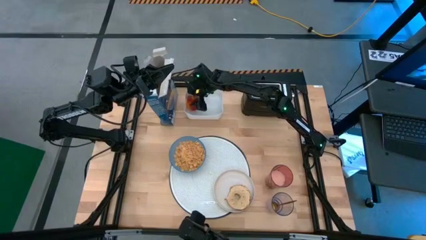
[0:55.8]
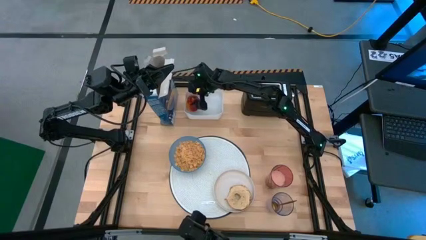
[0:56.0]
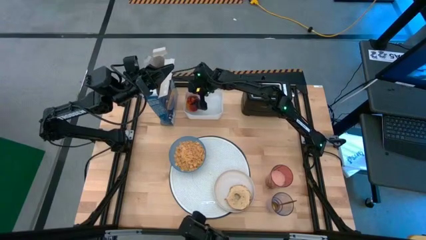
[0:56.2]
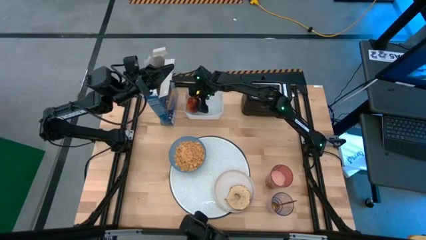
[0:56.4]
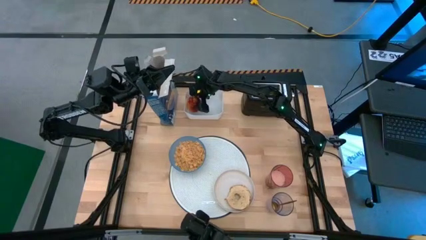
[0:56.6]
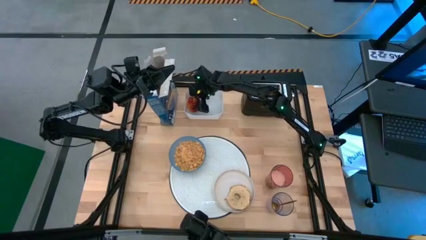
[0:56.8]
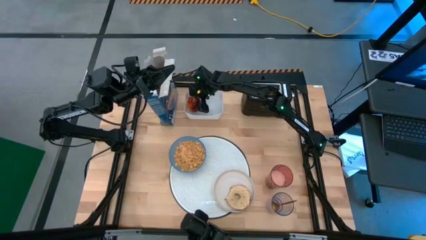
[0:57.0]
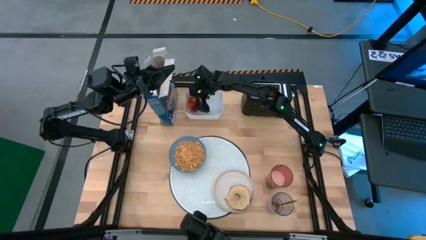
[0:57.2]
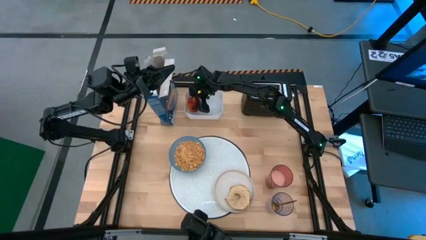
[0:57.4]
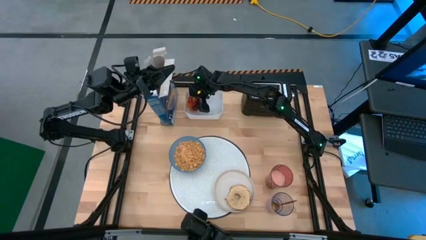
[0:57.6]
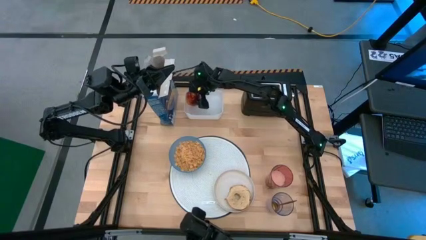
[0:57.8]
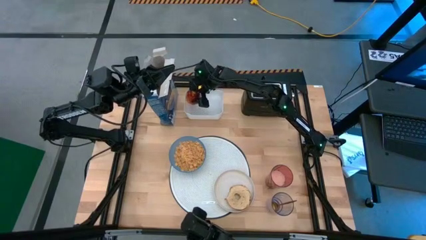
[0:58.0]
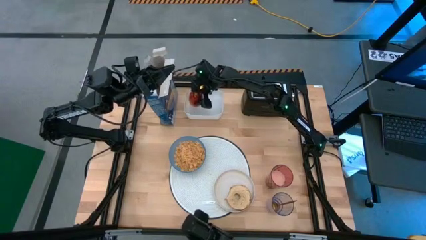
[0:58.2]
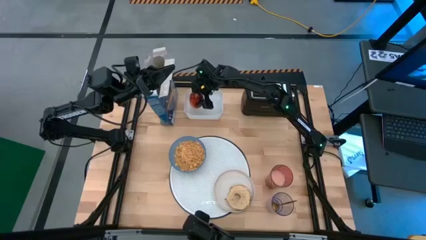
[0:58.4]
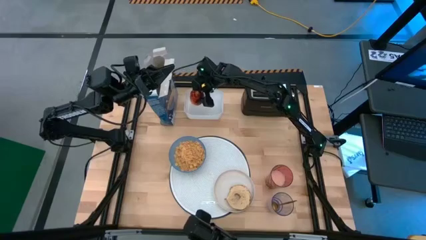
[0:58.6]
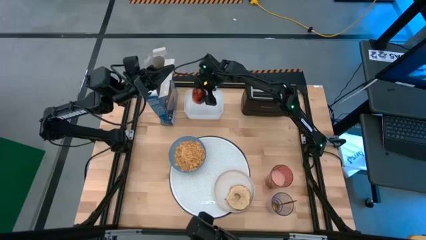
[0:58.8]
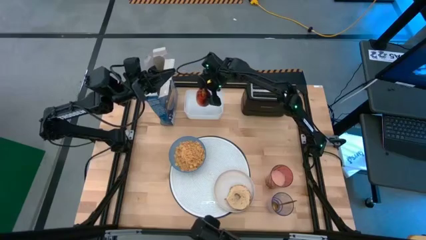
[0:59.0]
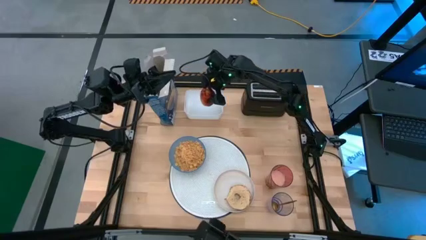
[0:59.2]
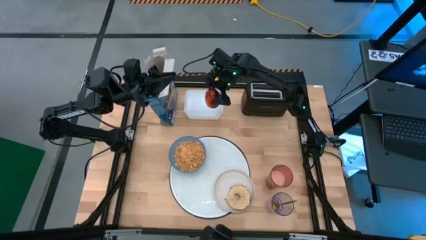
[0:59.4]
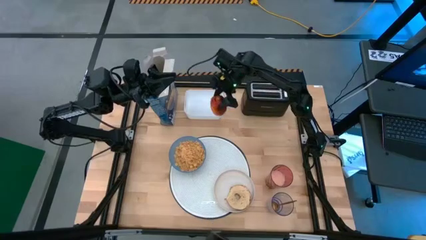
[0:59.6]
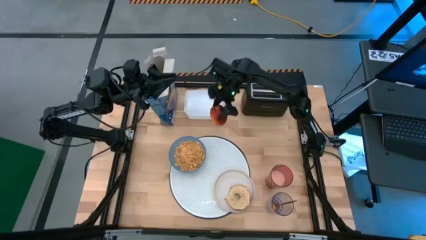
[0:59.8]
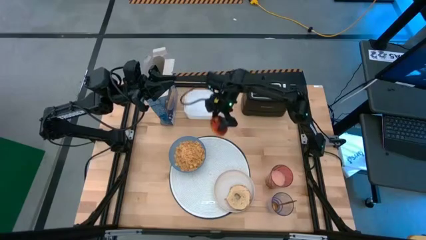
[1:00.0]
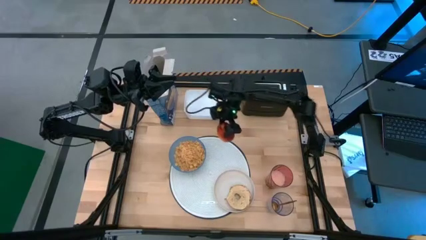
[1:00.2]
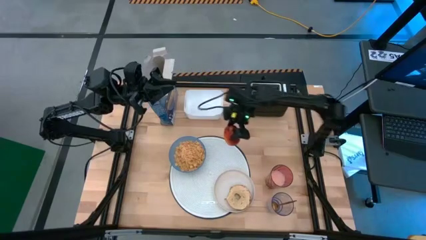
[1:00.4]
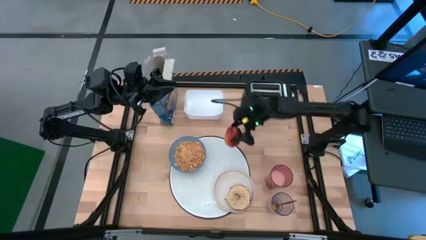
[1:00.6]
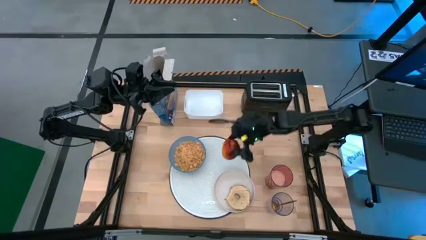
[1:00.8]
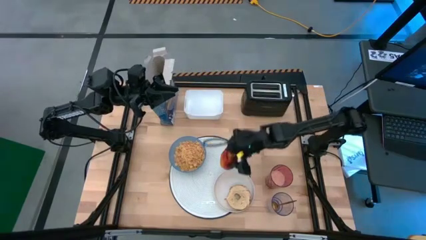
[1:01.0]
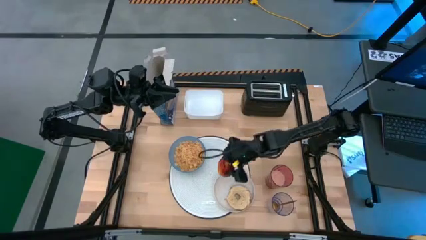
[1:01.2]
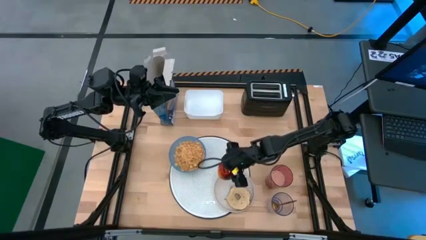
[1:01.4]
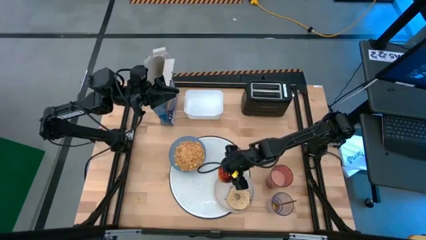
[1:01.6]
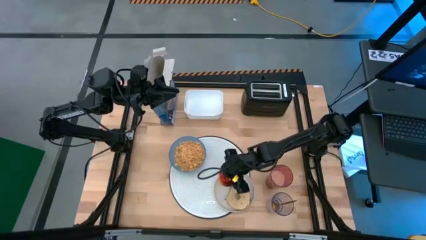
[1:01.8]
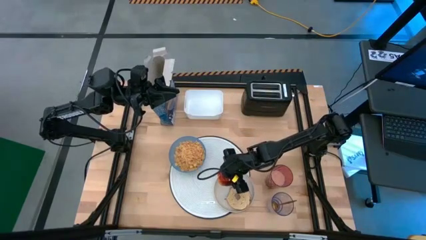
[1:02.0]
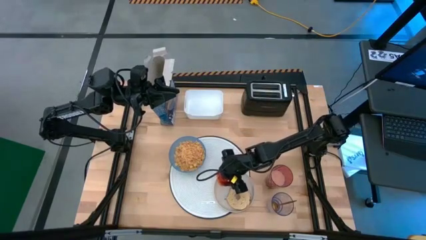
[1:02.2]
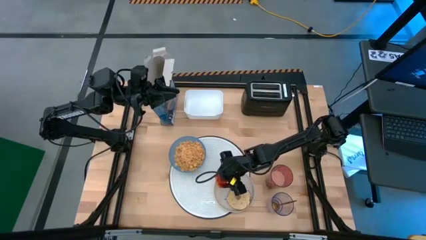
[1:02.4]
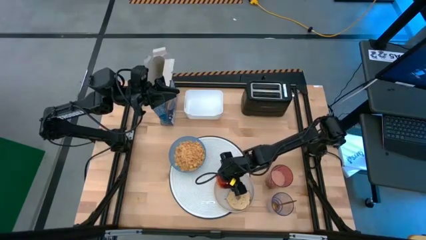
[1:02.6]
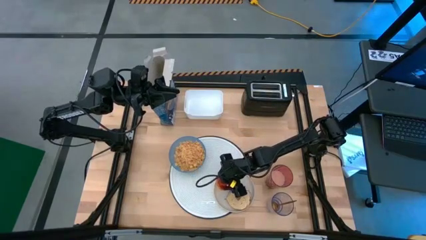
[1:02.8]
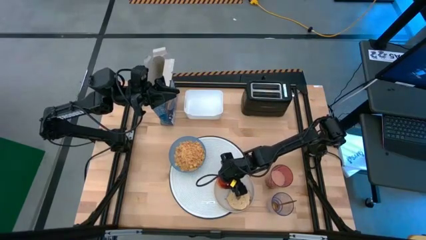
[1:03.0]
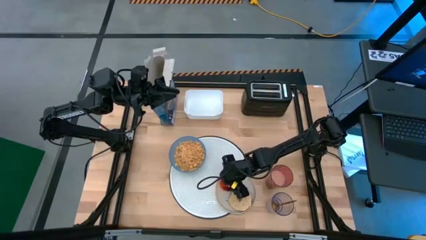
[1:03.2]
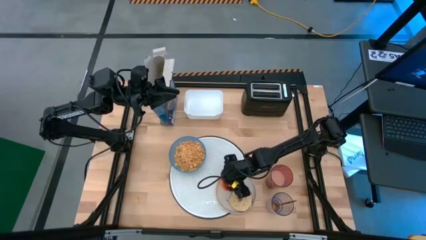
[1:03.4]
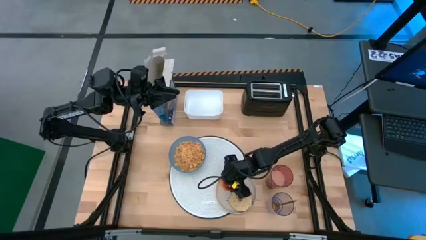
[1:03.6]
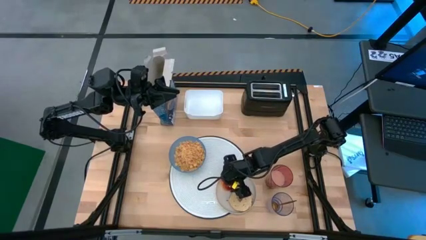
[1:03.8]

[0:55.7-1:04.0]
Task: Arrange a breakfast setting
Put the apple on the white plate

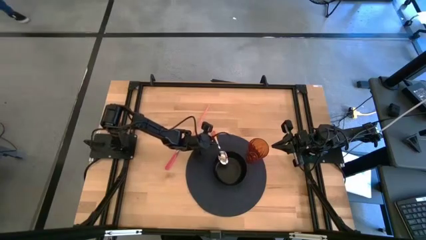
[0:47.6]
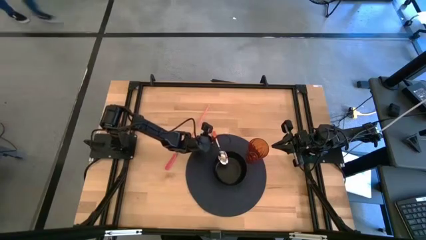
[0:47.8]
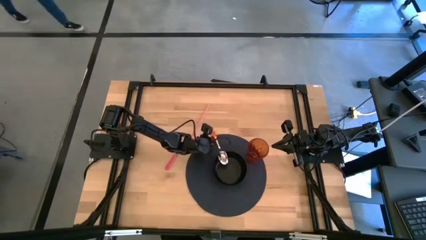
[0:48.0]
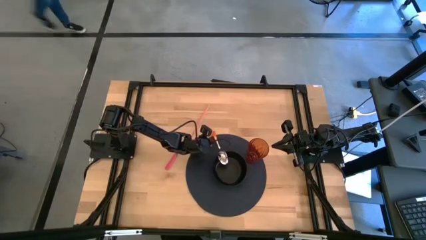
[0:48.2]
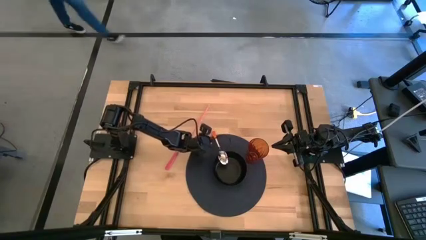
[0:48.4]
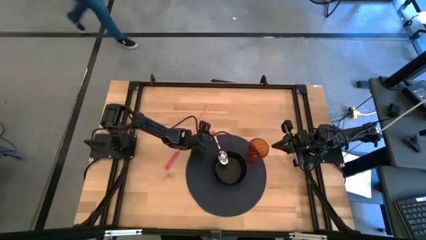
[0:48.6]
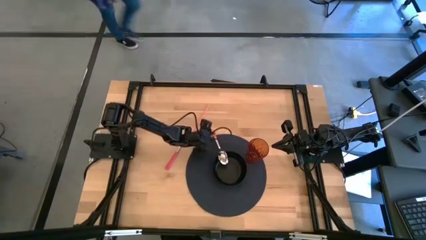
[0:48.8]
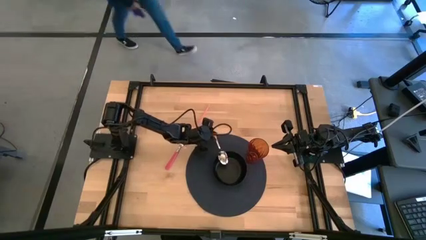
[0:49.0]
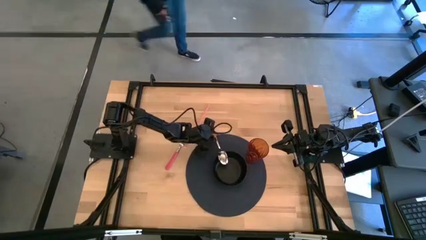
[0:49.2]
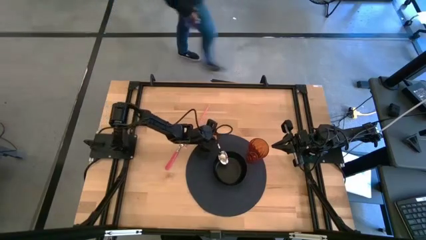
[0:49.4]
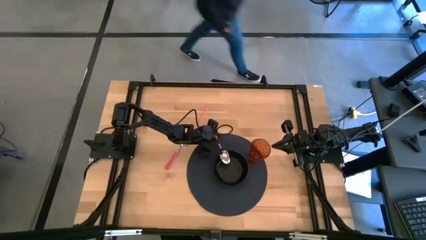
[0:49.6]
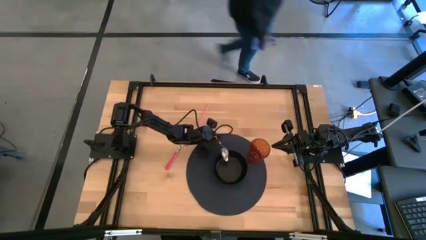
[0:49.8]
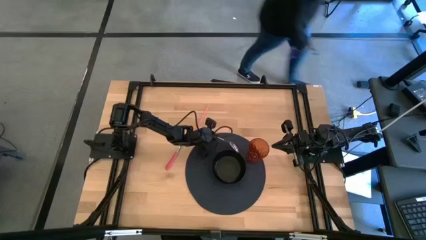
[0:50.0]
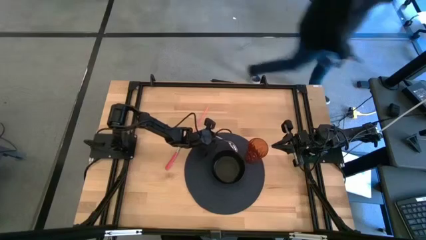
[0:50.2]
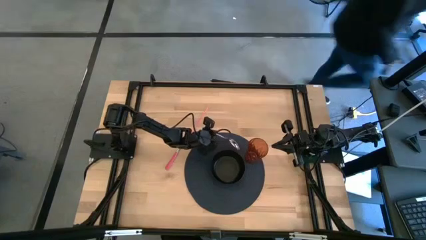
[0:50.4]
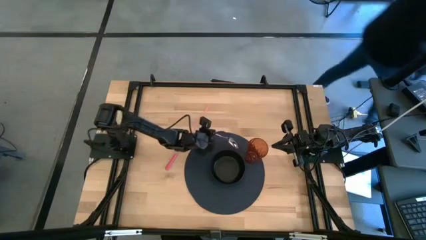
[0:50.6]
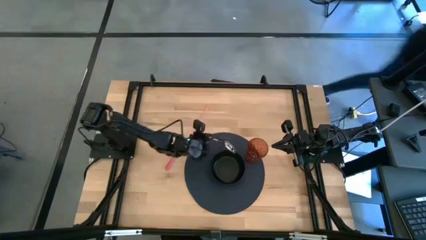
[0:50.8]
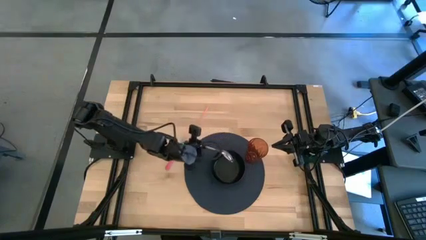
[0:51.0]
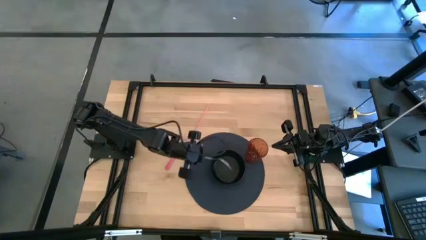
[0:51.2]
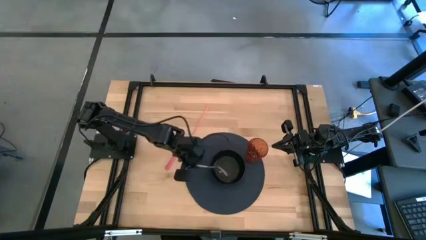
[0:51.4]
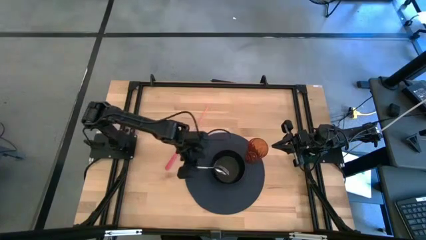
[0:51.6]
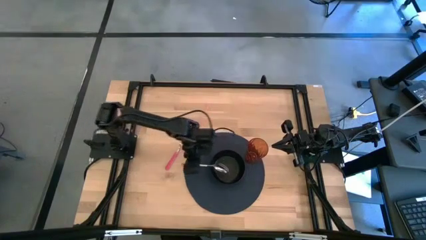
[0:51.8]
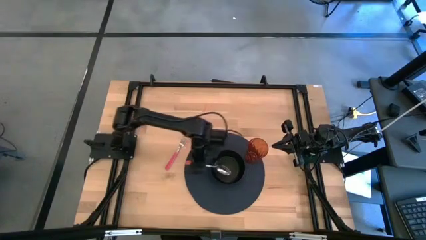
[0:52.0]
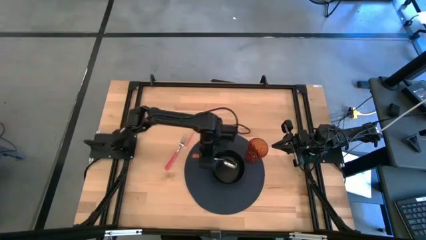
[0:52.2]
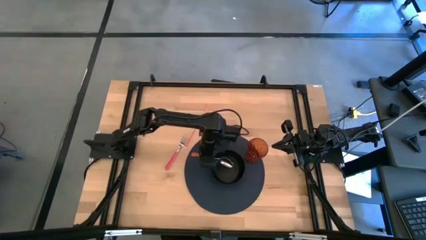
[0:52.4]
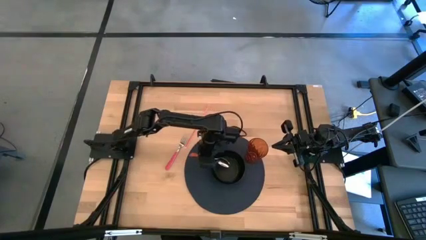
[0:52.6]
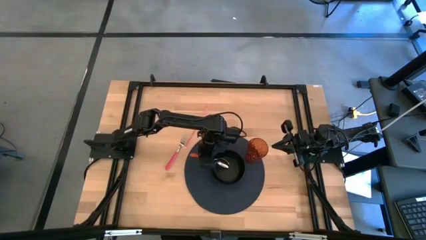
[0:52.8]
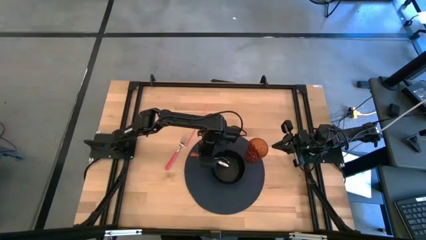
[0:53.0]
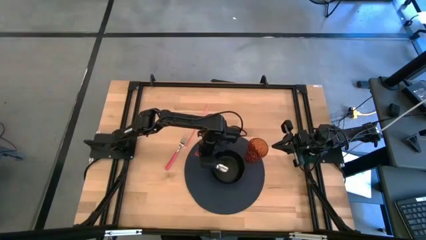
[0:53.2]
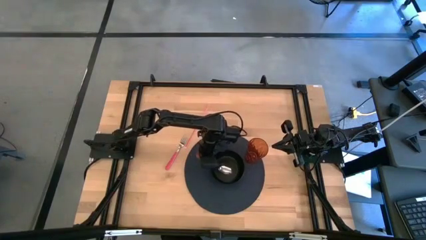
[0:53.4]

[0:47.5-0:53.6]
Task: Pick & Place Utensil
Put the orange spoon in the black bowl
